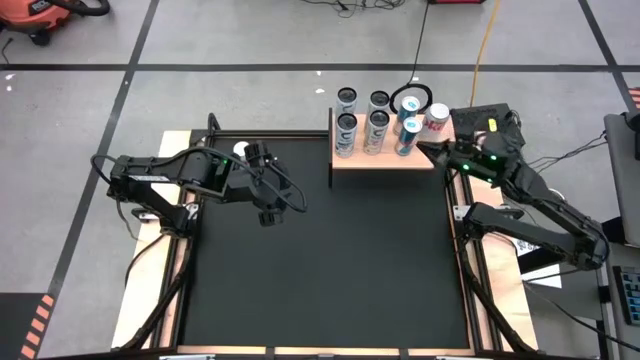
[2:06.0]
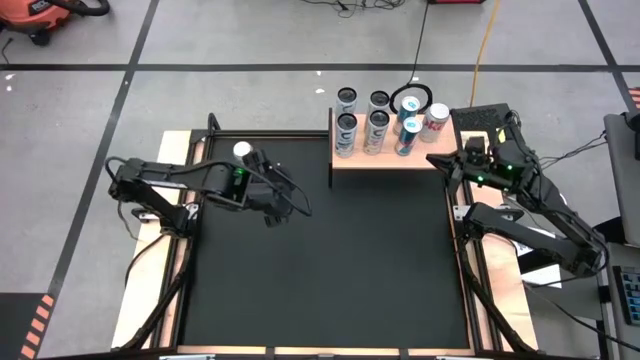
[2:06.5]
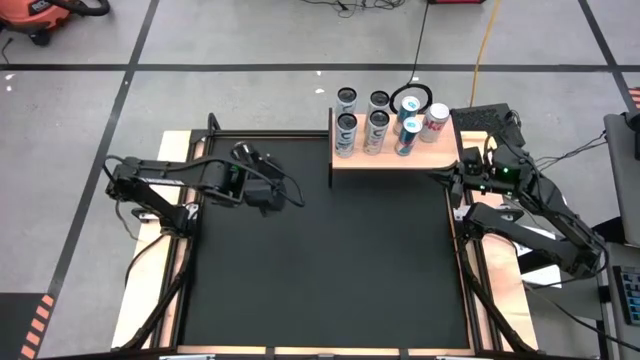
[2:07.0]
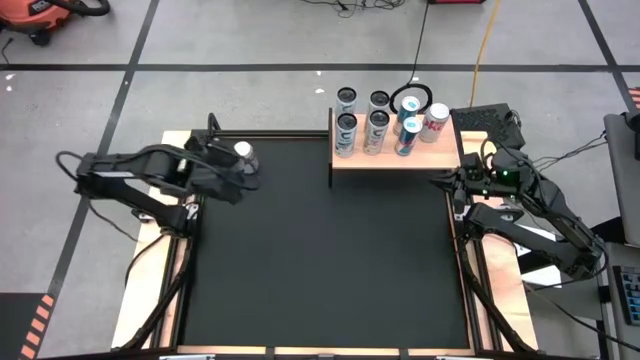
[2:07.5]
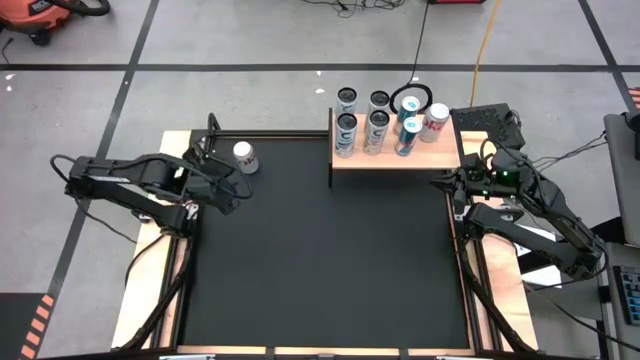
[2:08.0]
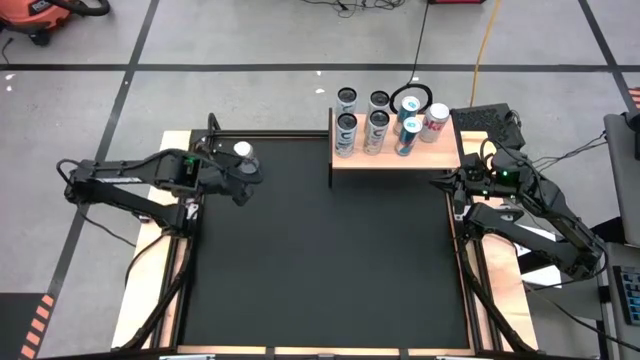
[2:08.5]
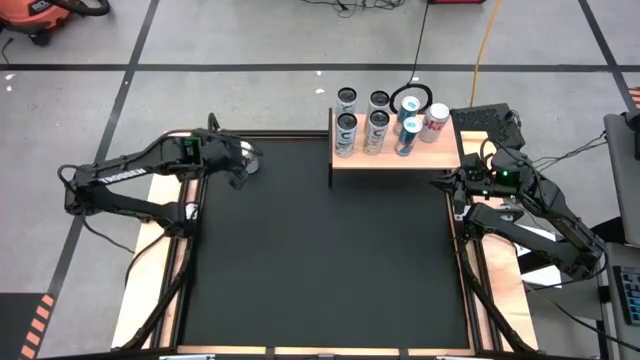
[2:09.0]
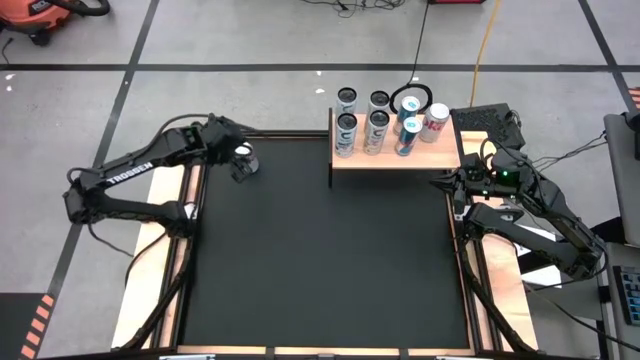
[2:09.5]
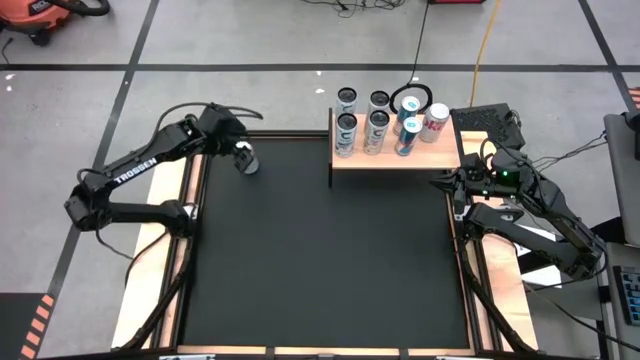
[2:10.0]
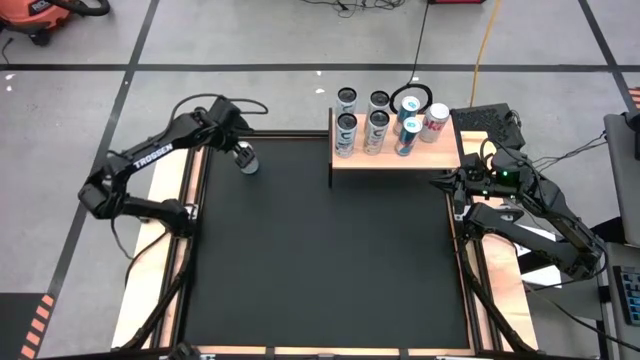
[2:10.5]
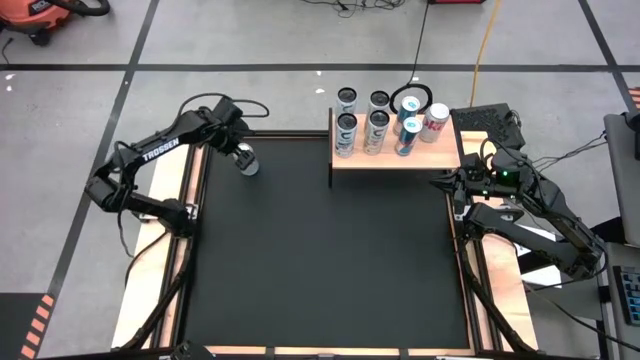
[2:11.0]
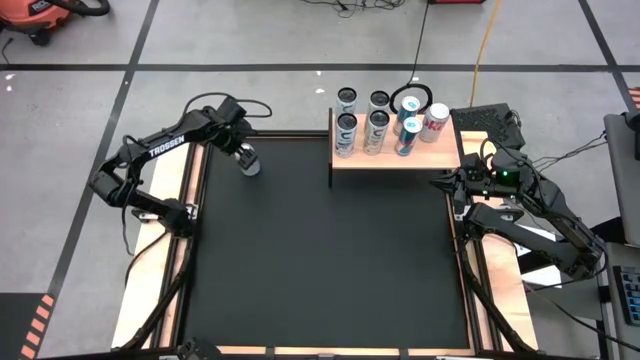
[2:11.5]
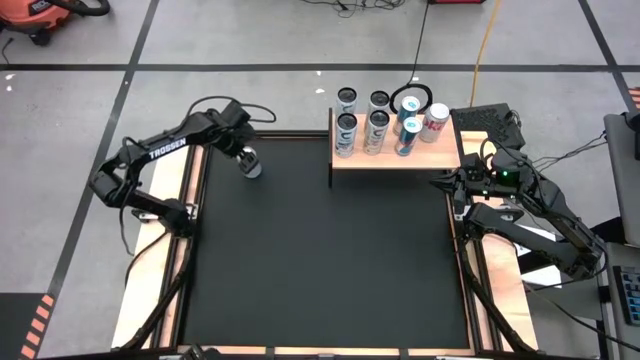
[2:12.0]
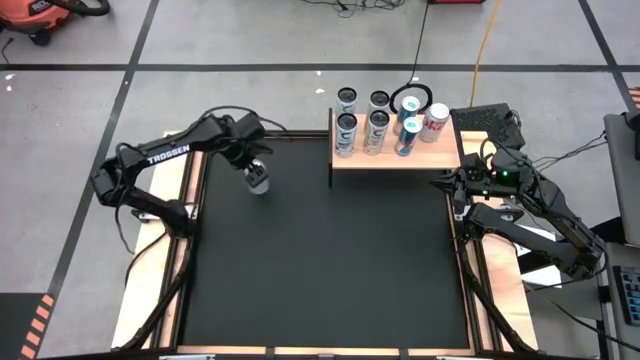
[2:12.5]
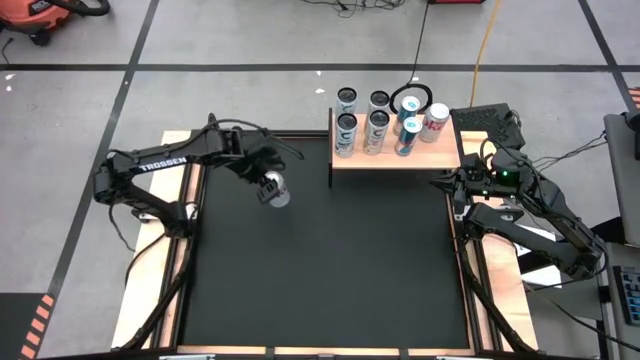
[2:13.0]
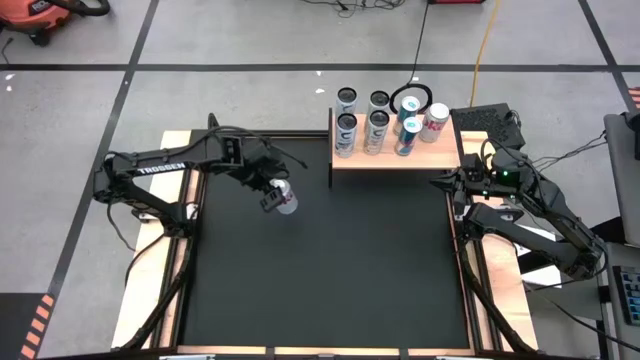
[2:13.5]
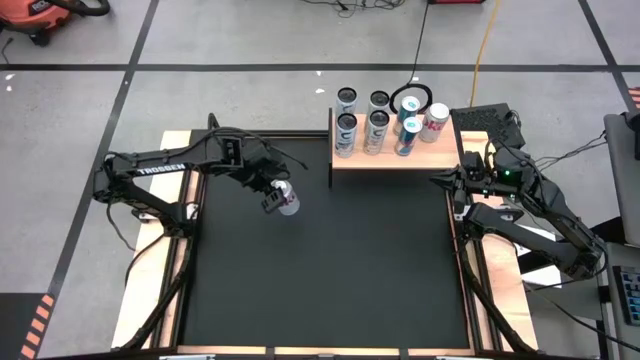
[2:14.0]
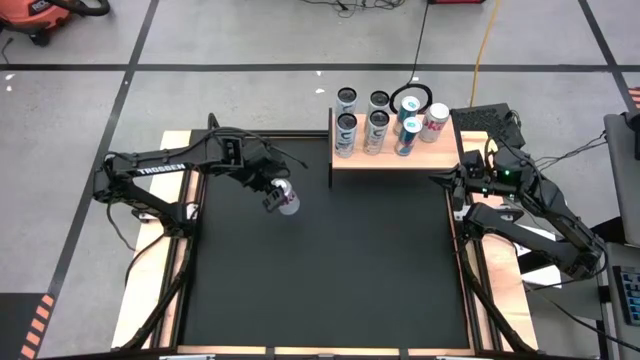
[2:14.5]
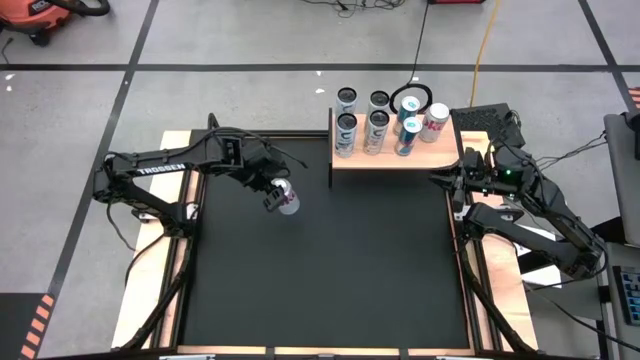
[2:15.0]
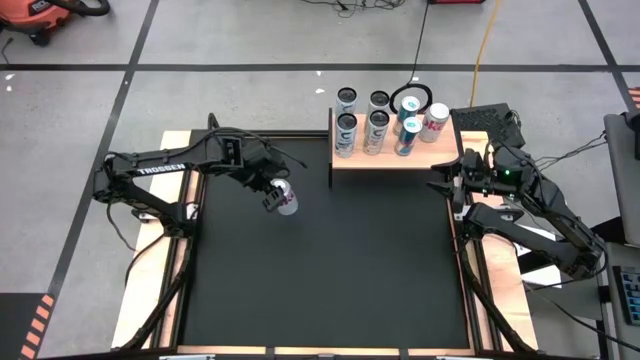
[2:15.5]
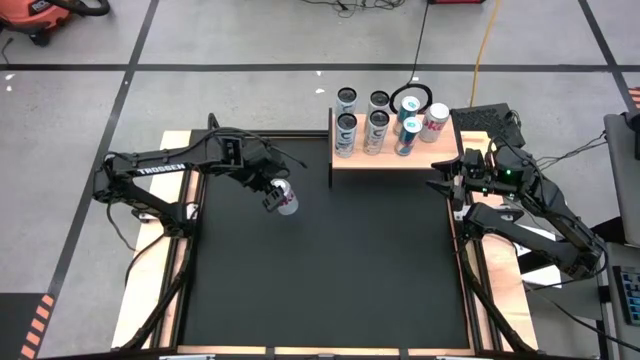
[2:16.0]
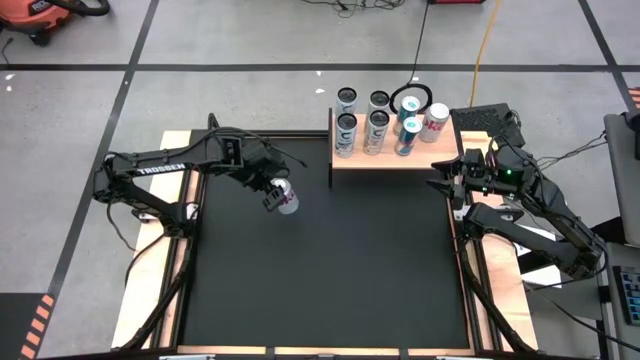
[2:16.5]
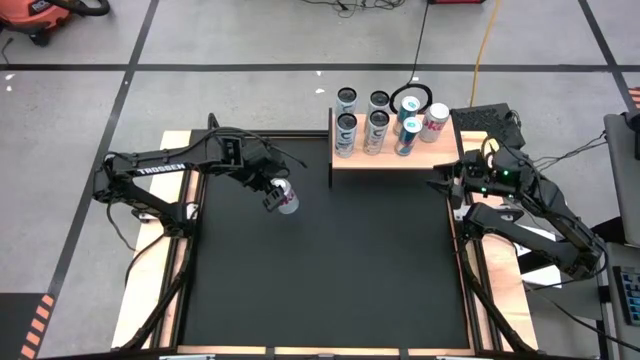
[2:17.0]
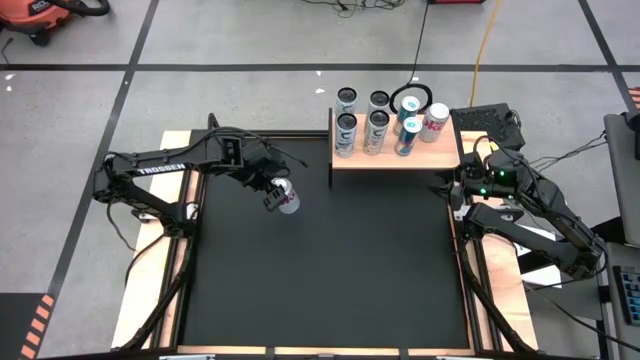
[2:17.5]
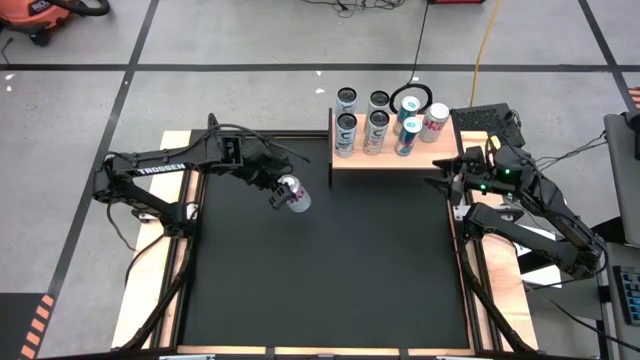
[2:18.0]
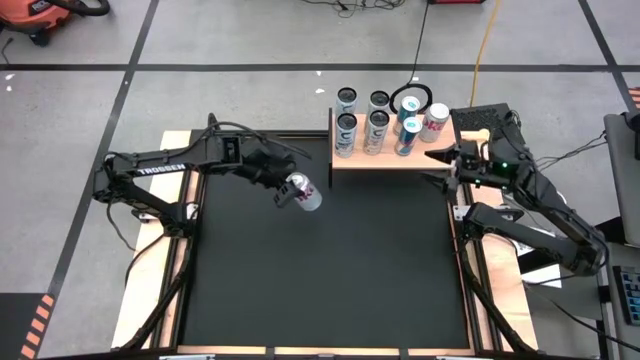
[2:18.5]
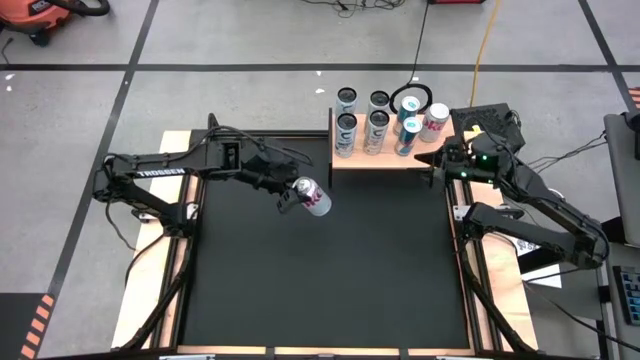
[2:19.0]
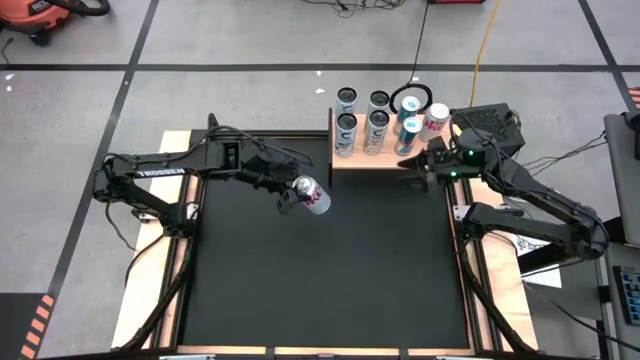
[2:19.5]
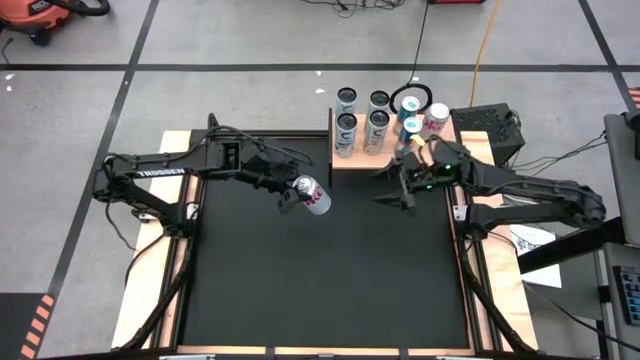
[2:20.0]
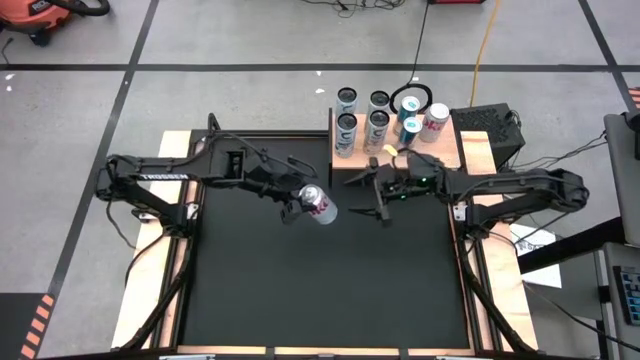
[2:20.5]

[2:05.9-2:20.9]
Task: Place canned beverage on shelf
Put the red-silver soda can on the shelf aligned with the other red-silver soda can

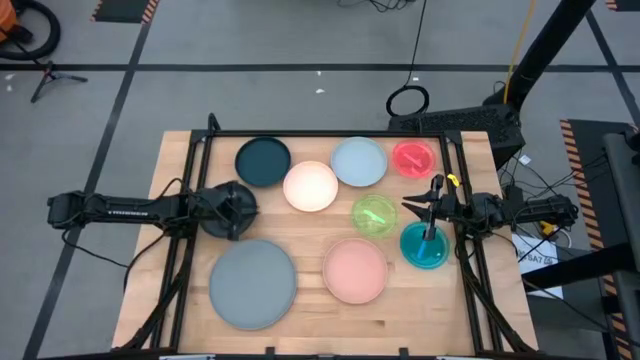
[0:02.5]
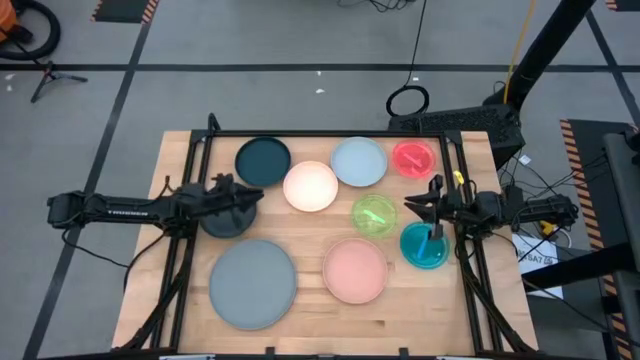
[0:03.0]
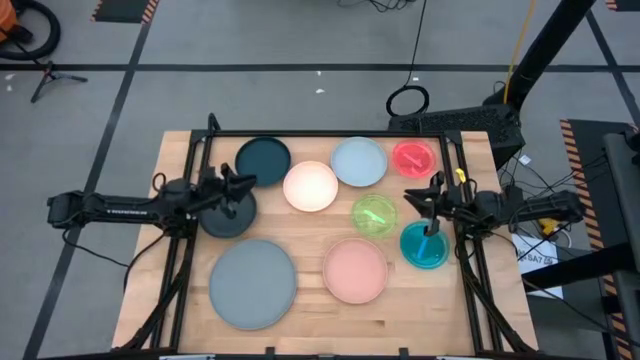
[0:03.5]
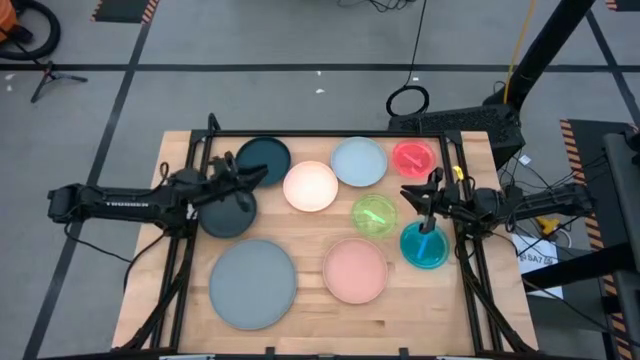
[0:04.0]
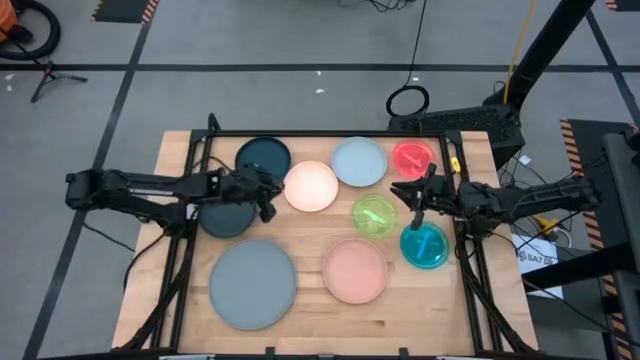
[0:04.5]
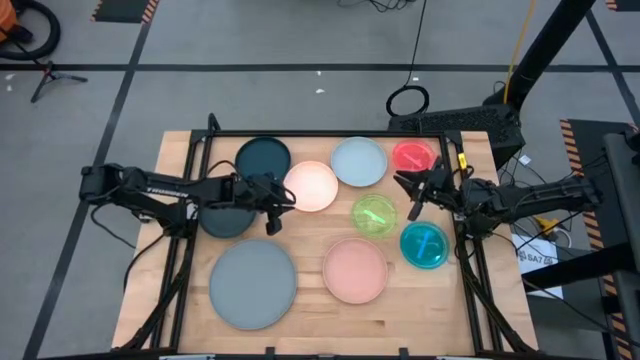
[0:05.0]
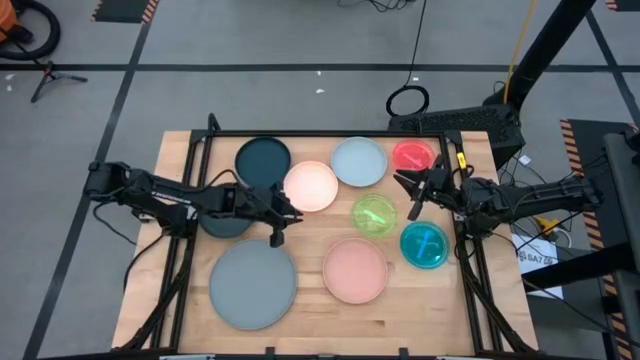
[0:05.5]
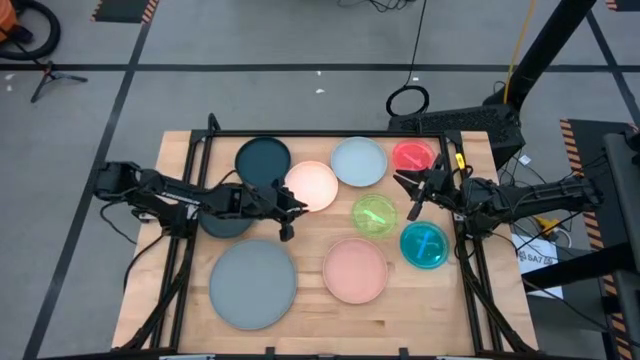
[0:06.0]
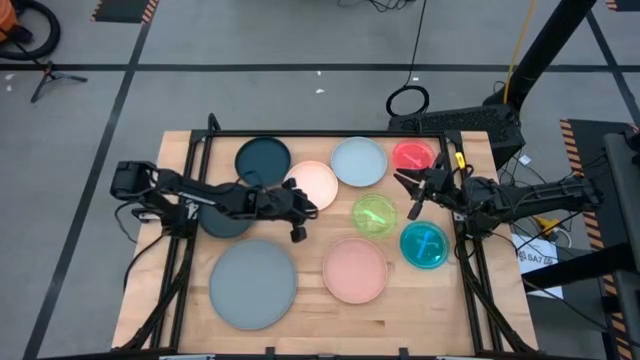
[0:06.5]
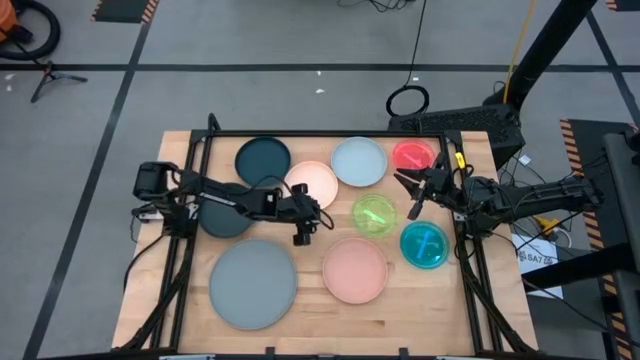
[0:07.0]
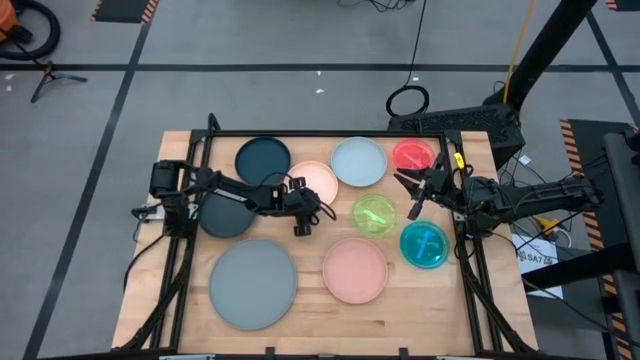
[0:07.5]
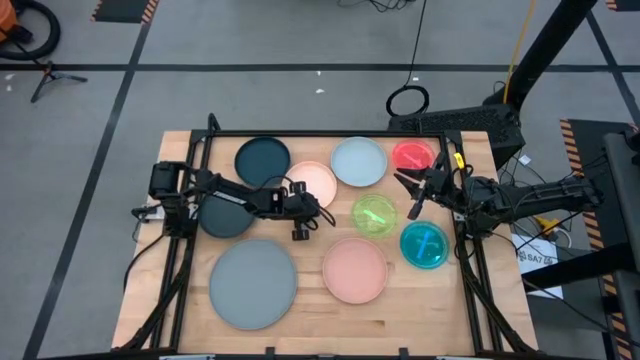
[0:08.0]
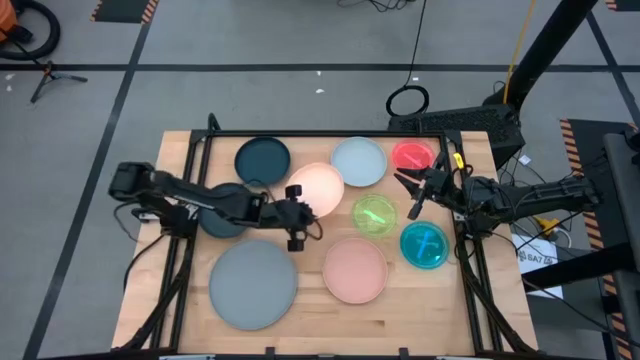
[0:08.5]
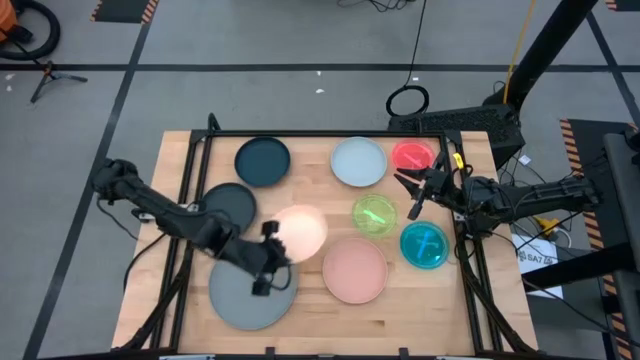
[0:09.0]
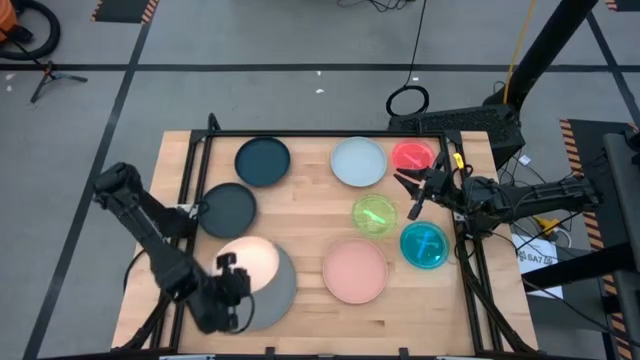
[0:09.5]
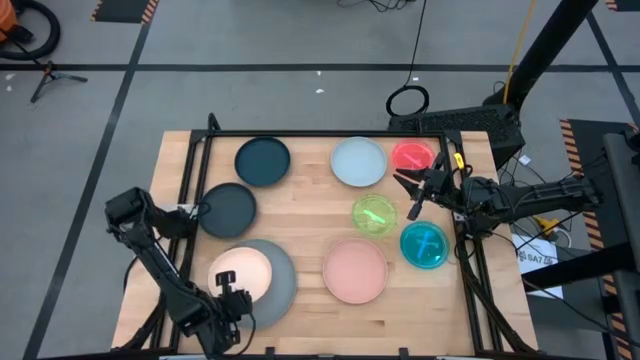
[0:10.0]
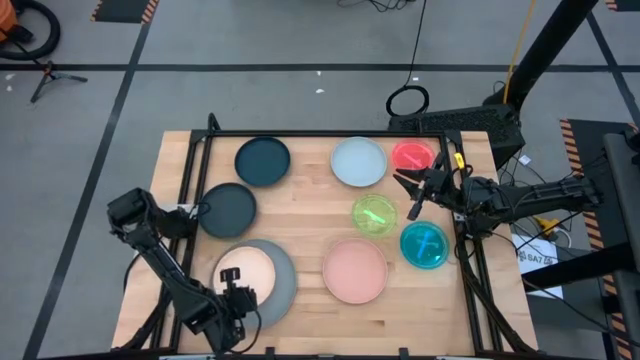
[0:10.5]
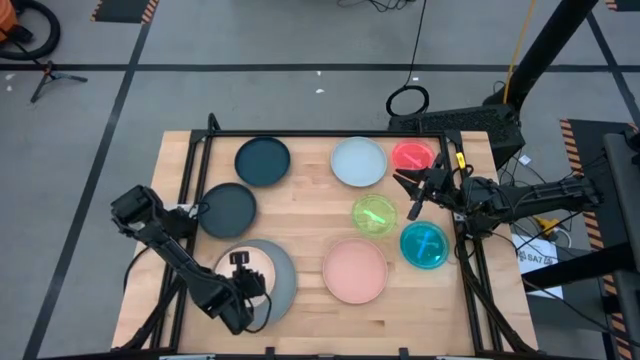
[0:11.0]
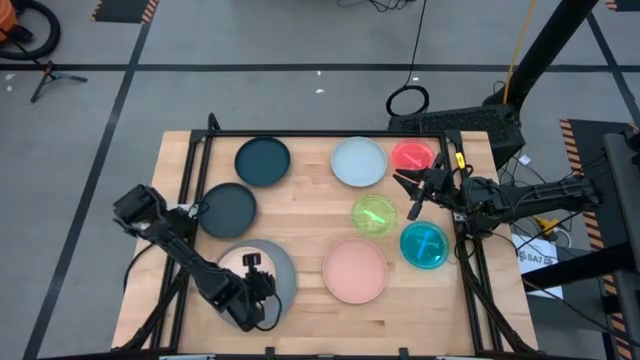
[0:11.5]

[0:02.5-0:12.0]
Task: Stack plastic plates
Stack the light orange plate on top of the gray plate
